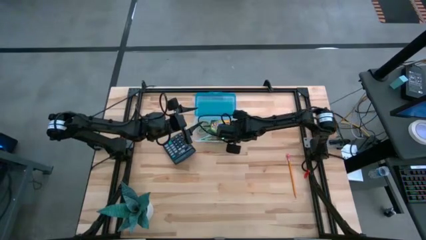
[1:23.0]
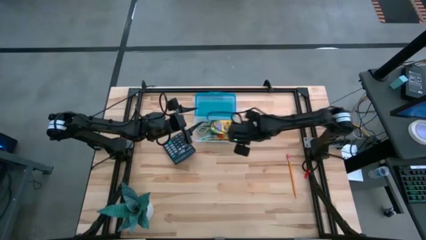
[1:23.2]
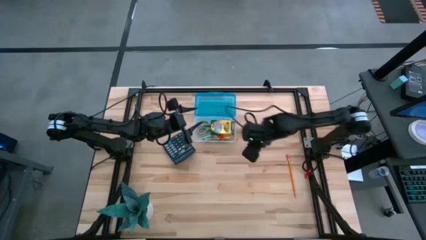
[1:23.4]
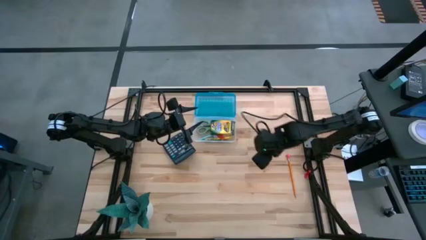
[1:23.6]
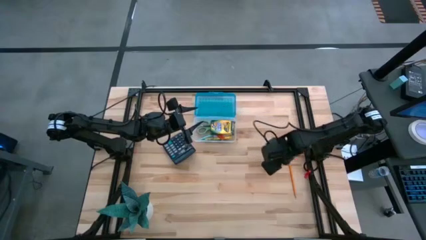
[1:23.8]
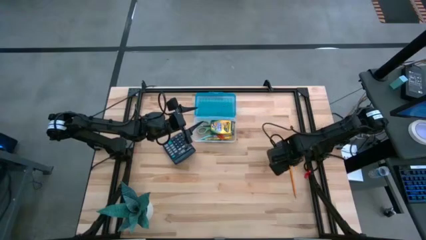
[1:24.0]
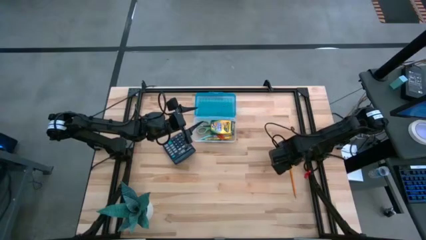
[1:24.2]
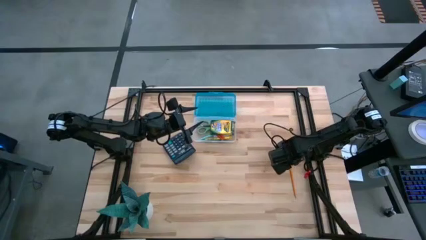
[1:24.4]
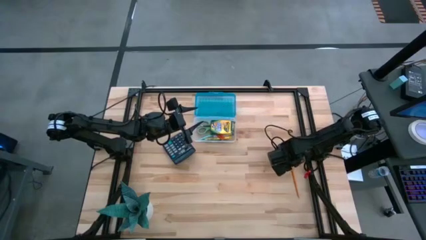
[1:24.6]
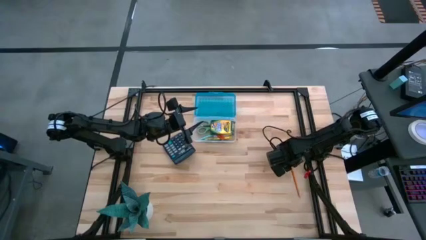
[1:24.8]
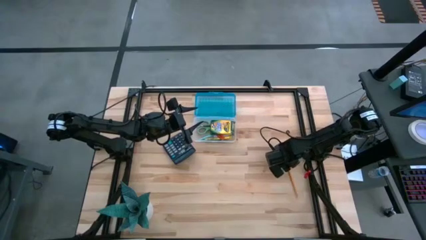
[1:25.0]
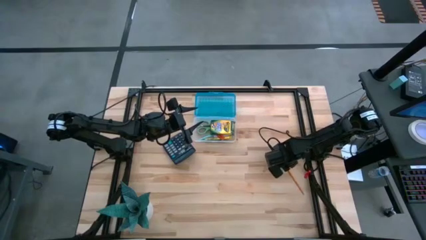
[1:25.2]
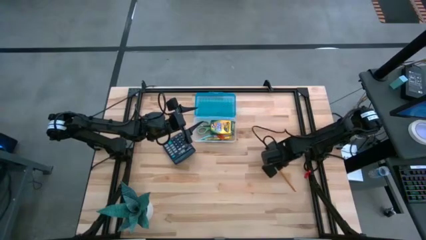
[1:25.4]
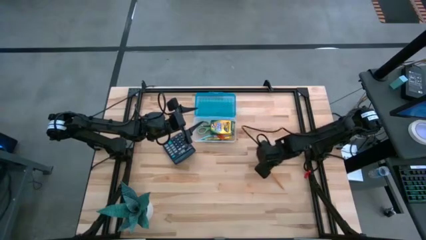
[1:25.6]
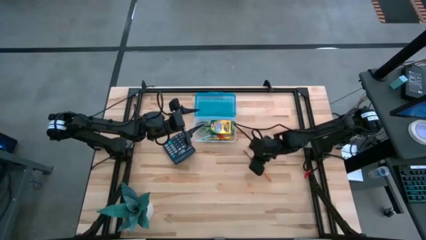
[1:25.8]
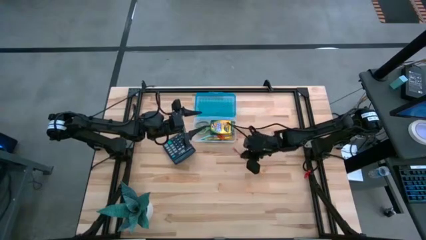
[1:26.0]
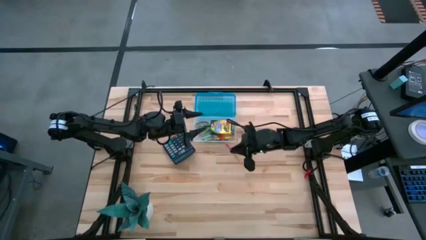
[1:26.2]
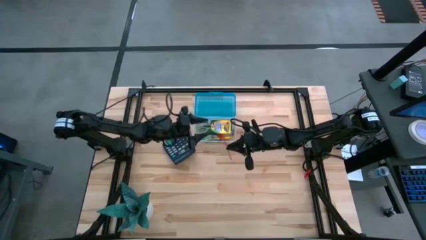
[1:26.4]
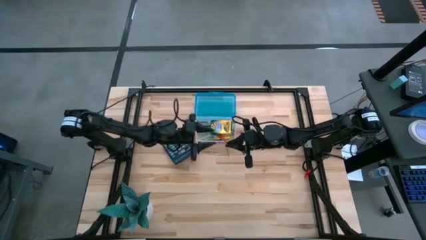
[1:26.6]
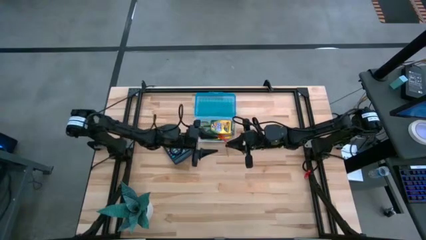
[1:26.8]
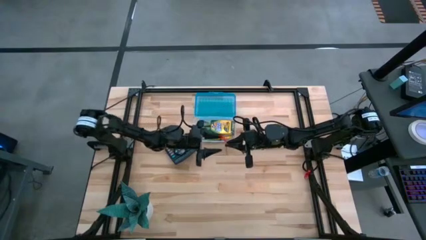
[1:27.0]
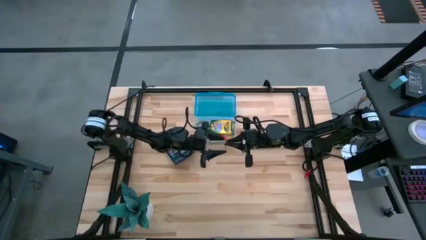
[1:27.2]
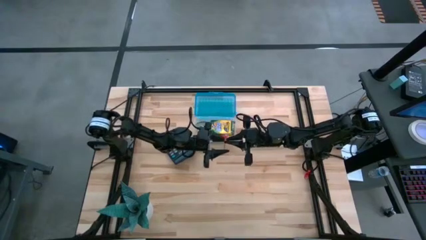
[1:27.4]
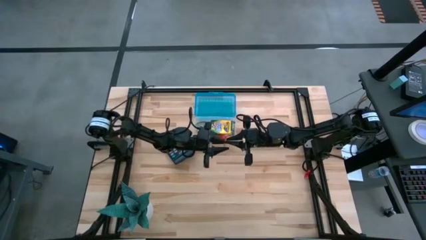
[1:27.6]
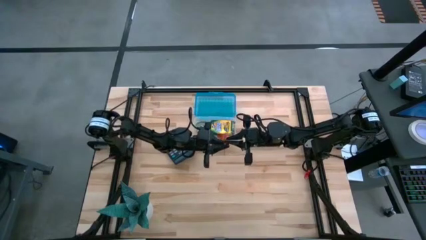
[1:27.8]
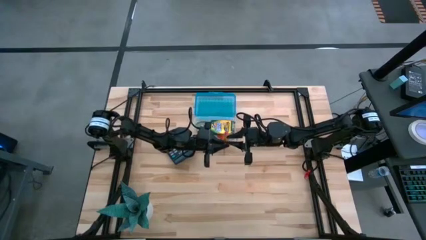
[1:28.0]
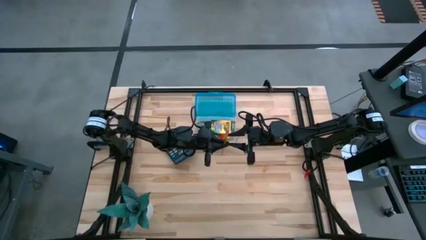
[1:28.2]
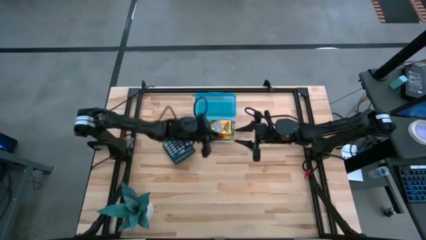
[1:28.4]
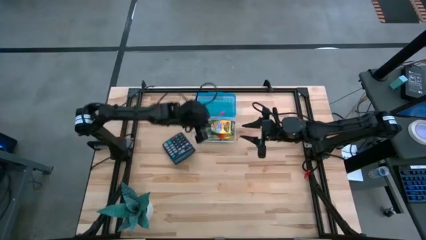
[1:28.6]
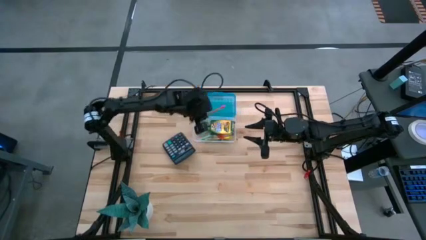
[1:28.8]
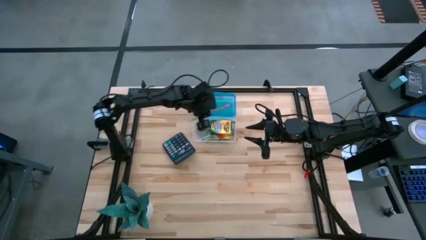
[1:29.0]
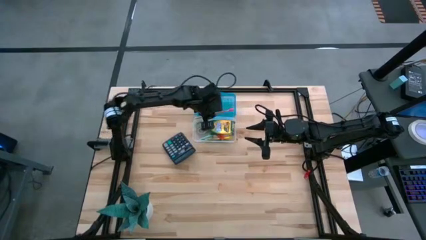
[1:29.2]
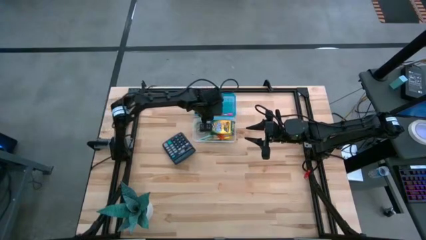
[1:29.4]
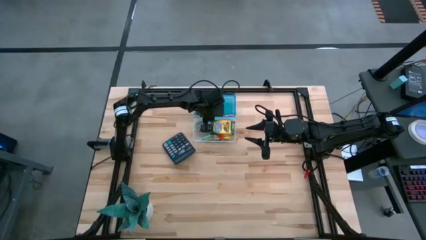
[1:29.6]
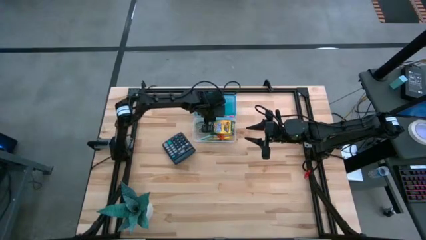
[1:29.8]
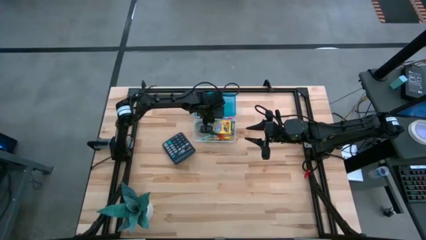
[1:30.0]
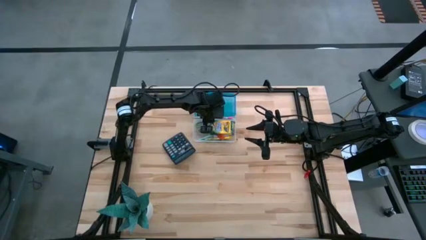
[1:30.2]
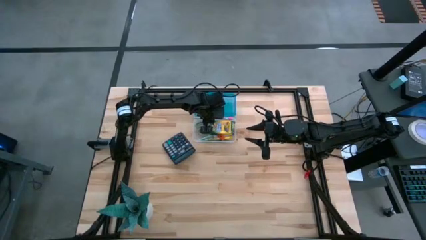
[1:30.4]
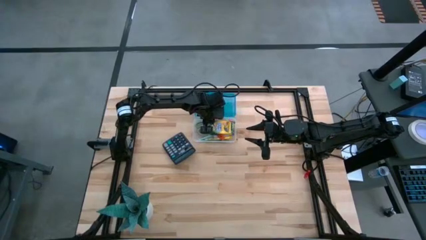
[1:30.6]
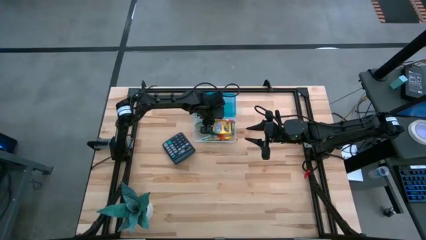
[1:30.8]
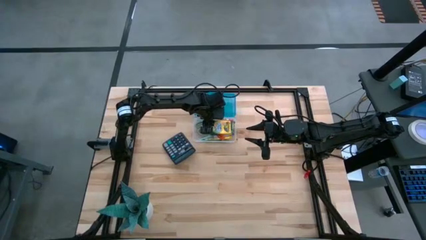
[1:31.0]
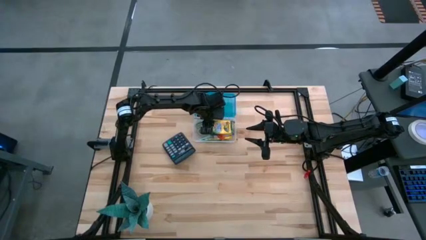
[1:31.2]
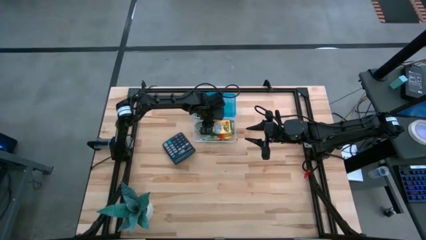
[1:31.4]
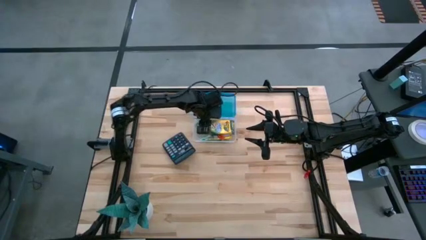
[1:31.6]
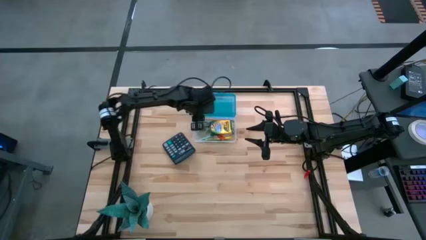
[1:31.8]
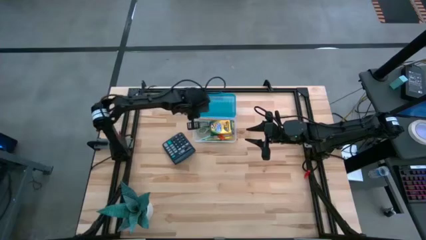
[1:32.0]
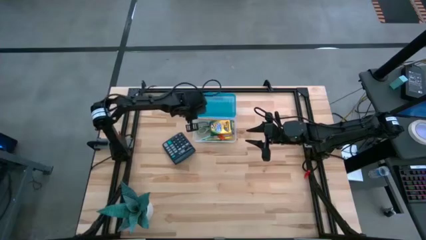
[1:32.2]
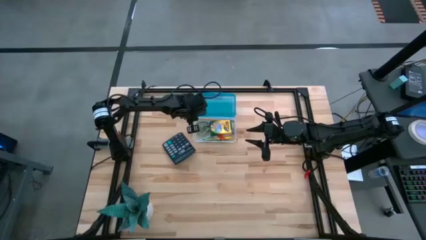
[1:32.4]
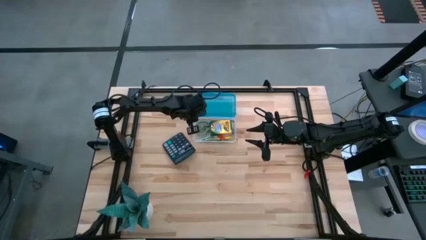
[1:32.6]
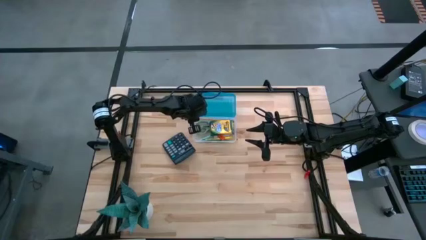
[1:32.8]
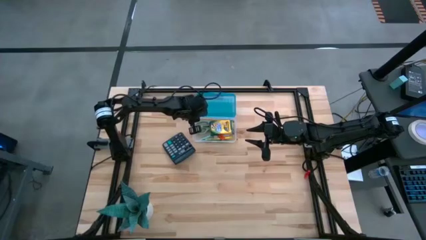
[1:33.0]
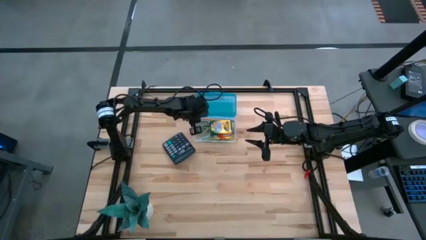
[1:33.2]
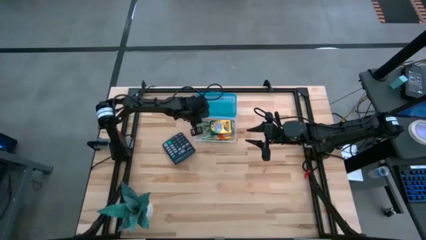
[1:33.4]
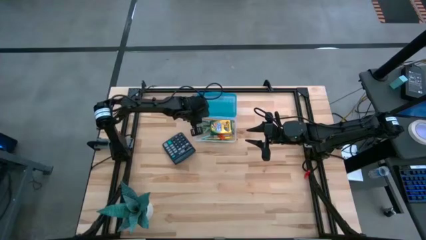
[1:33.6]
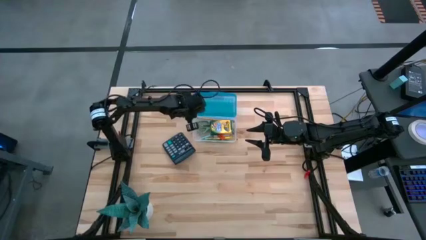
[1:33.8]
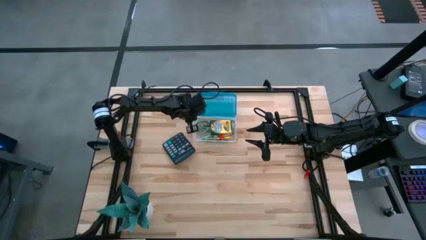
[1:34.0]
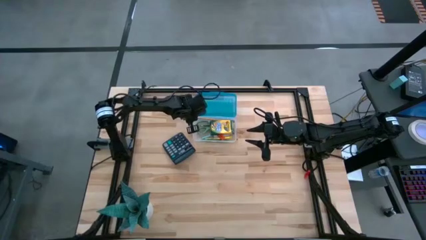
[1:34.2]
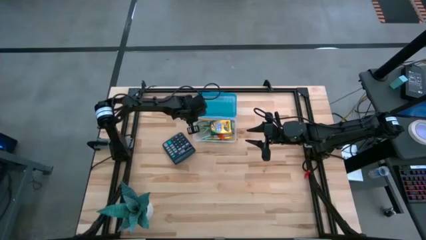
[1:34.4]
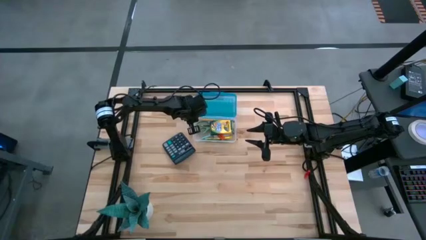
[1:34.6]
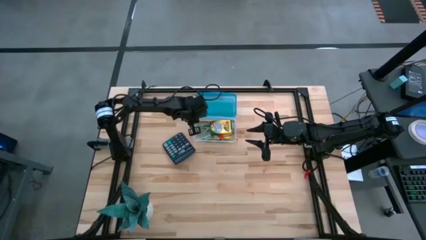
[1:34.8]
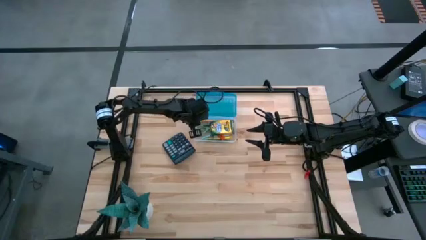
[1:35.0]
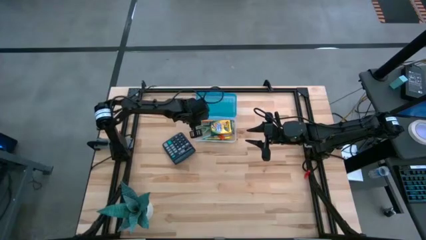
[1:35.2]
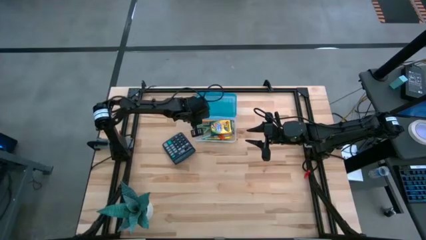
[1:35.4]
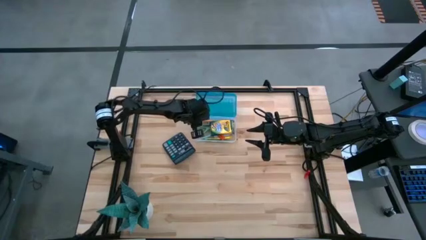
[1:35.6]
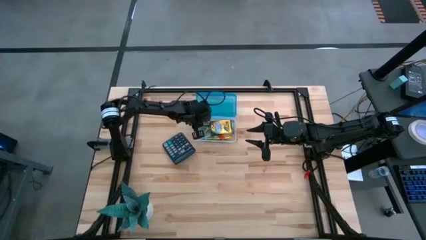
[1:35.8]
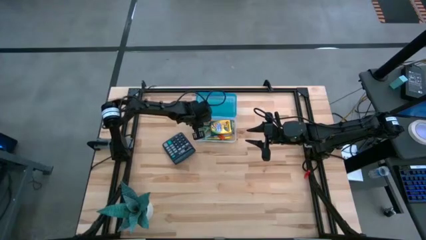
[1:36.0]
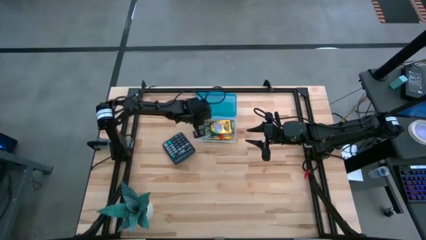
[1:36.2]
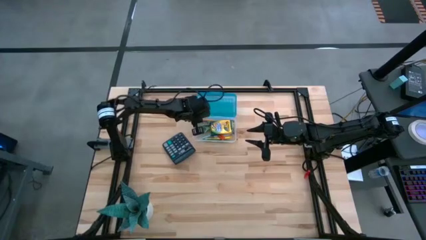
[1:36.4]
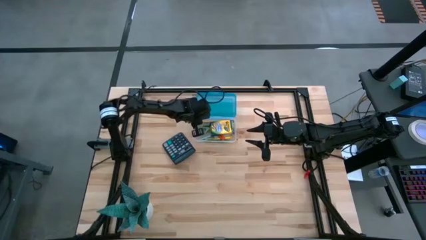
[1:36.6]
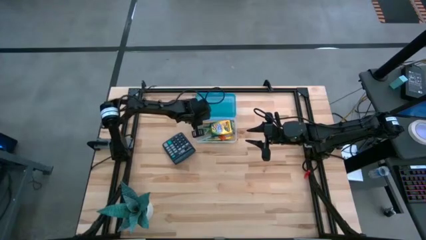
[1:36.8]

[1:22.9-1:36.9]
Task: Pack school essentials
Put the orange pencil into the blue supply box

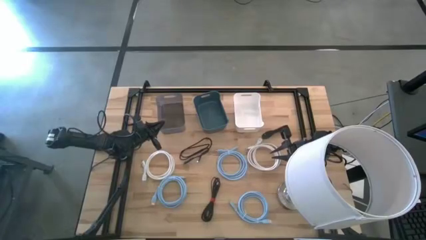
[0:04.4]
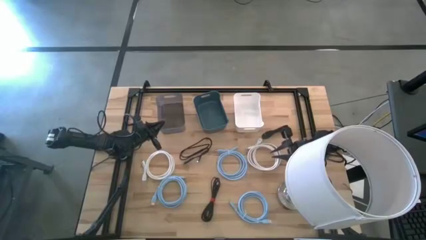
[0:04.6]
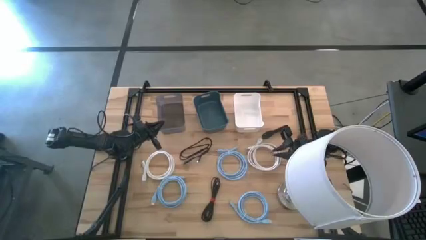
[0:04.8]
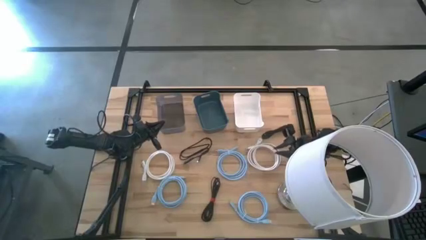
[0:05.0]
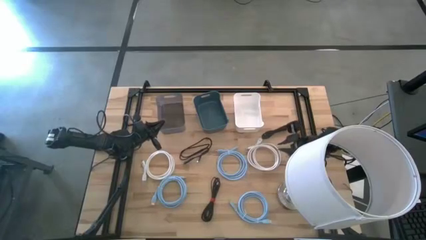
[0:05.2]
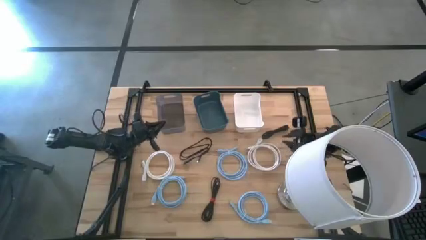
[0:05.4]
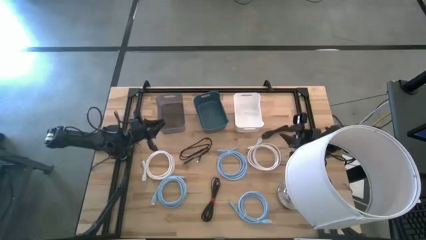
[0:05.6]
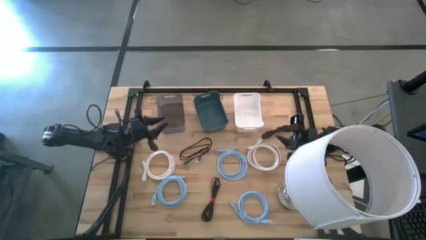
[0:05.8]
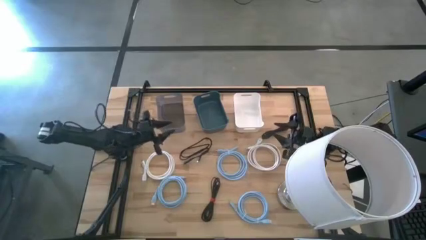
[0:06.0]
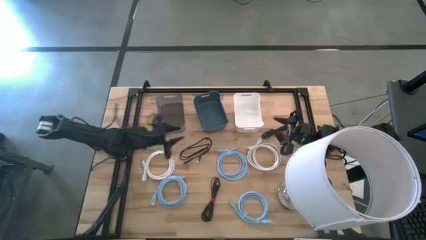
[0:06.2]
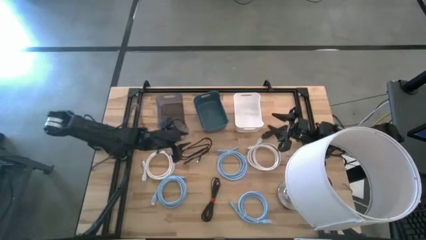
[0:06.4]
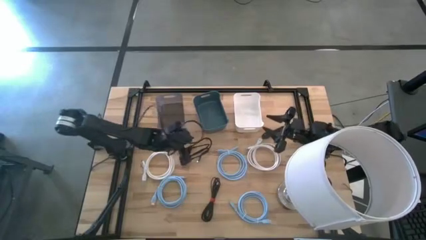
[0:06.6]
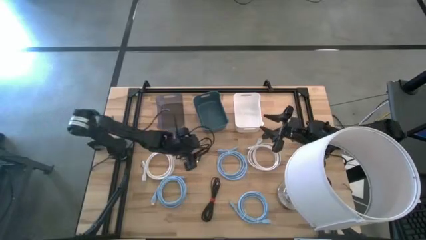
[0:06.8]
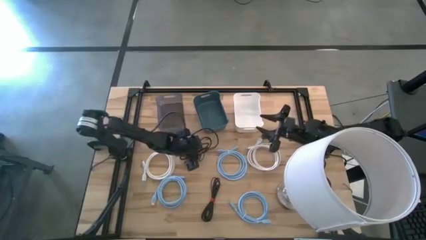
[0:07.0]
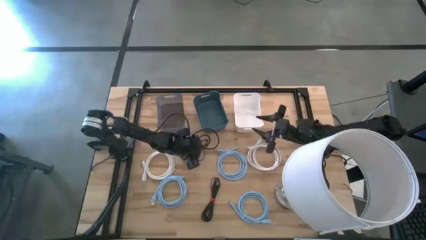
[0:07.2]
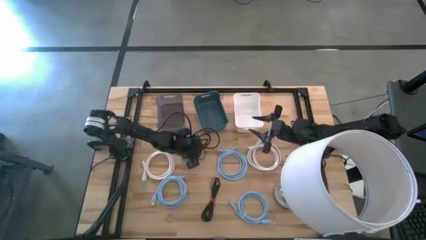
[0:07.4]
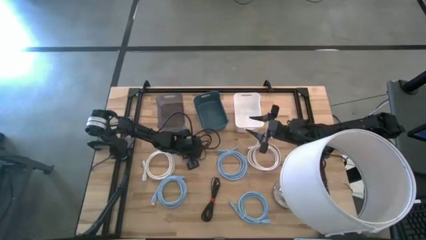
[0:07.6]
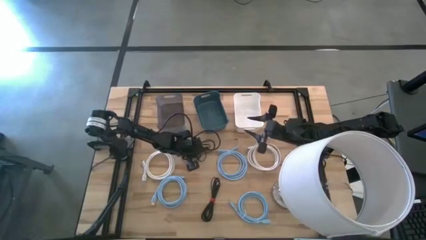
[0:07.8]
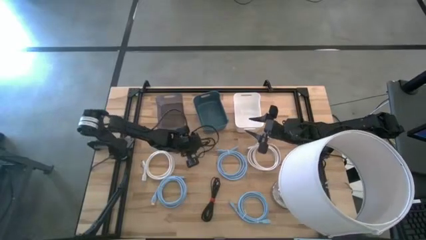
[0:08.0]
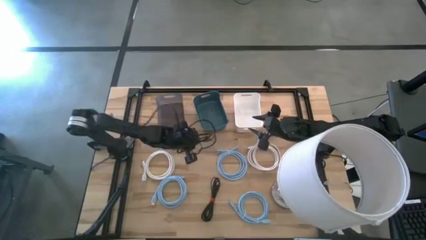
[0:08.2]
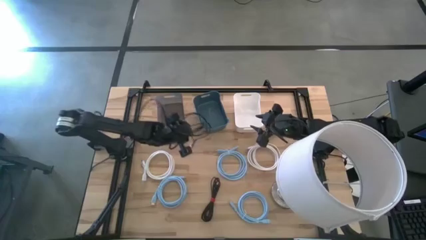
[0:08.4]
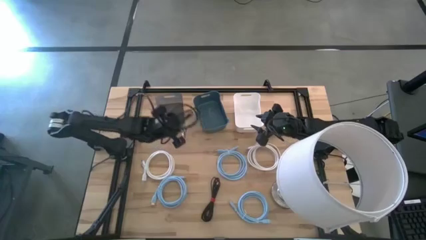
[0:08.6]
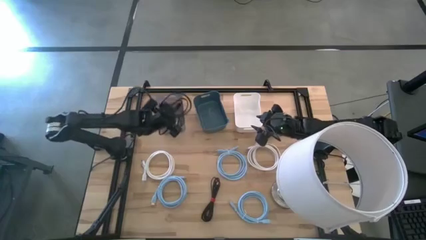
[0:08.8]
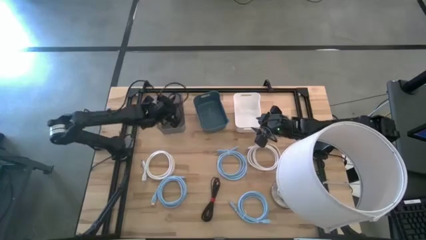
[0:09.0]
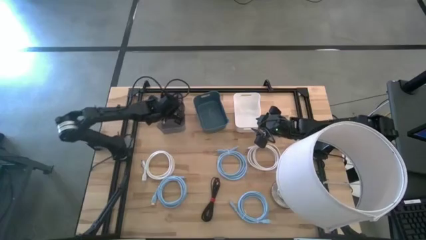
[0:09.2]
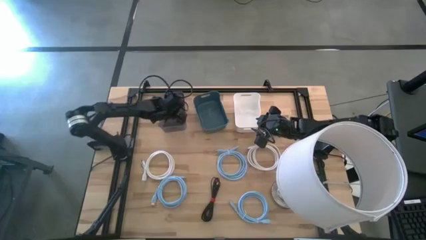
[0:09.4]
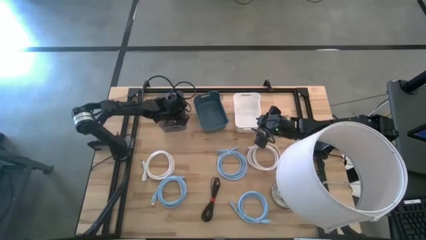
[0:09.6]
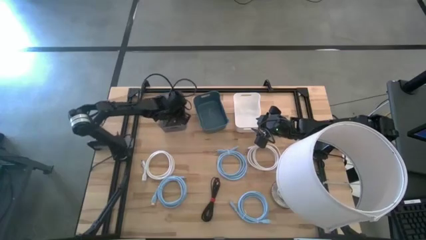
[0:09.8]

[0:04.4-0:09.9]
Task: Sort HDMI cables
Put the top left black HDMI cable into the black bin
